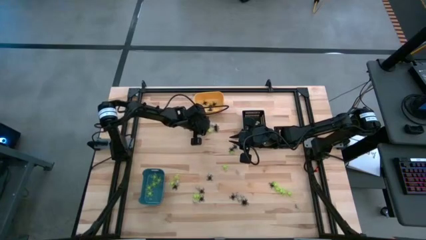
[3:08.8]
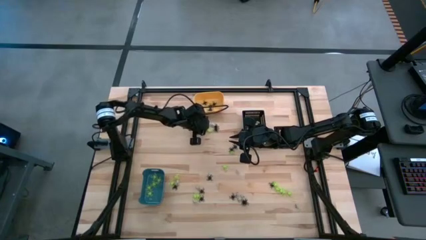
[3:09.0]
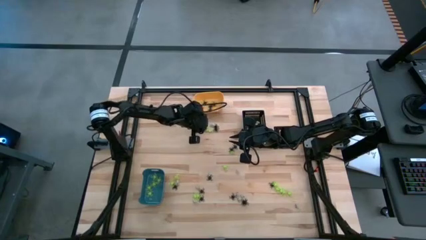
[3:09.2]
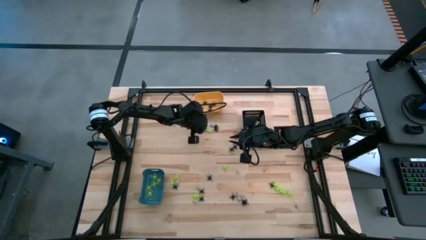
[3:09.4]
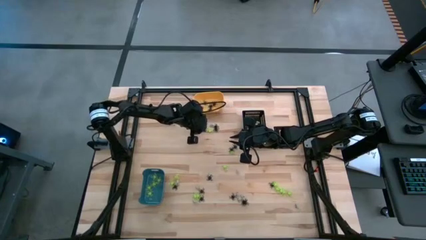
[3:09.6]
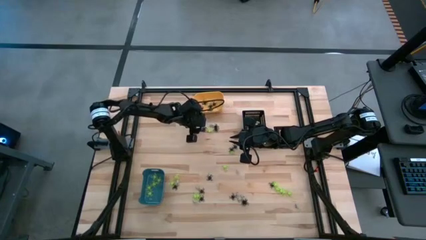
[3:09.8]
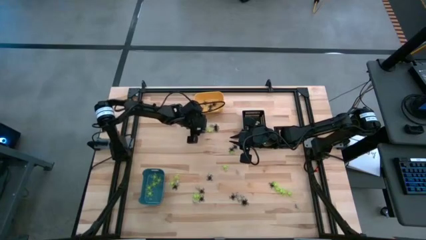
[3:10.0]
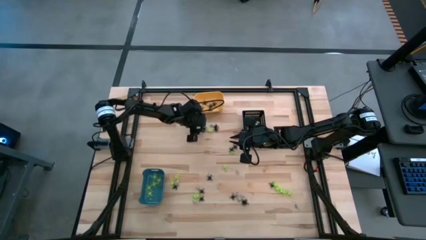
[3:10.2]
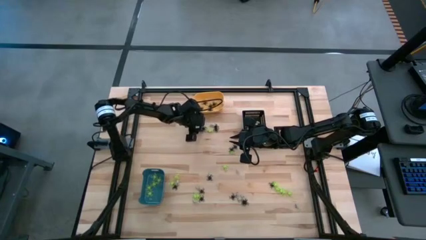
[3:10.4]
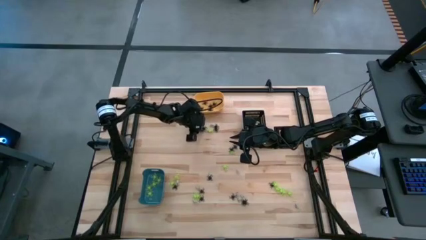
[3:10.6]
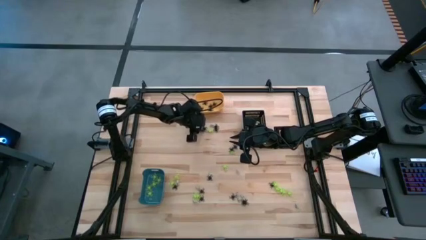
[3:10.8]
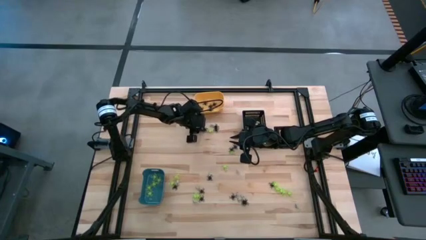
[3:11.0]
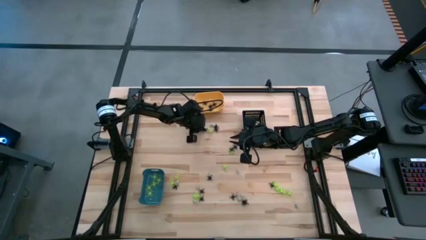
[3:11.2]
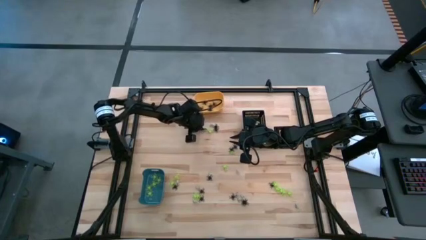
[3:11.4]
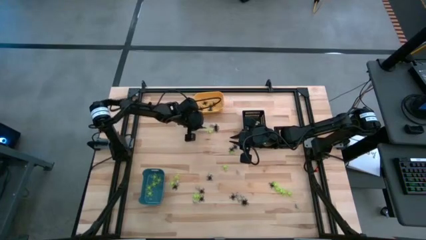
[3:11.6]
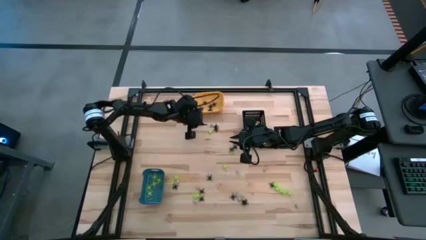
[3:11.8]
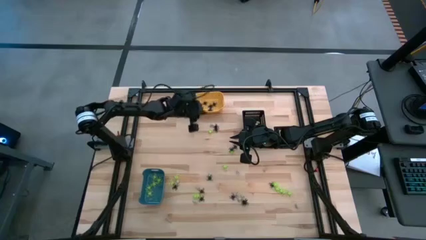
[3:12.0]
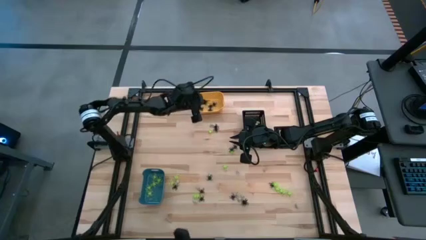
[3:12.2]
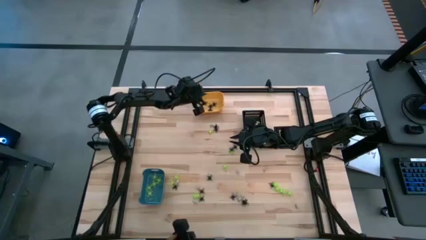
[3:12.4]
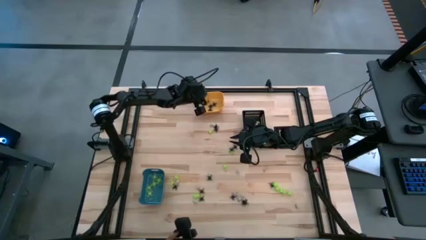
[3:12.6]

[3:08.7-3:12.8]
Task: Sort Halloween decoration
Put the black spider toy into the yellow bin

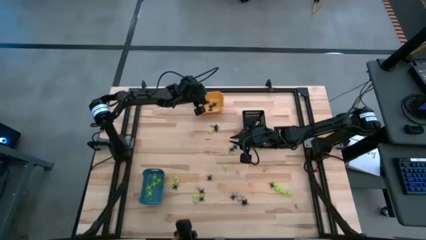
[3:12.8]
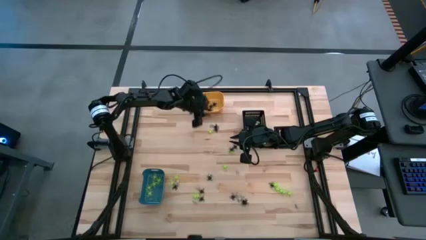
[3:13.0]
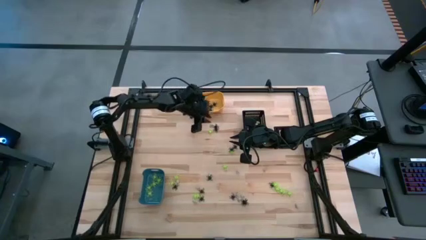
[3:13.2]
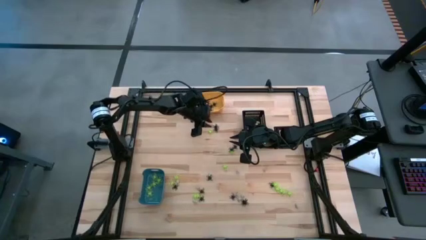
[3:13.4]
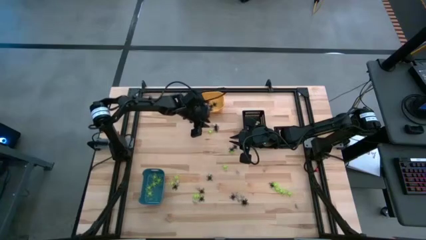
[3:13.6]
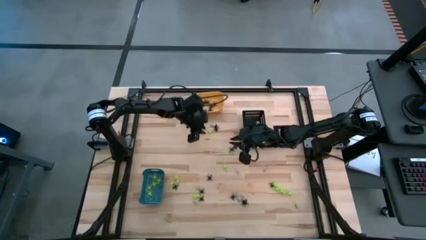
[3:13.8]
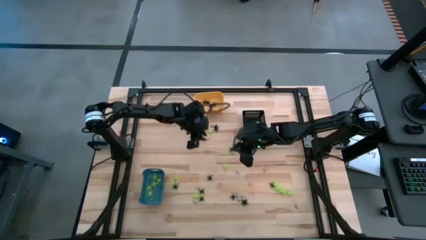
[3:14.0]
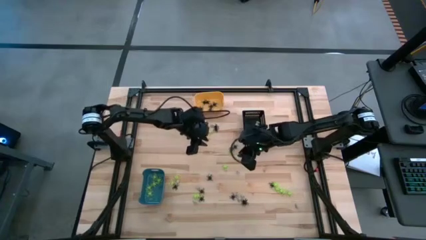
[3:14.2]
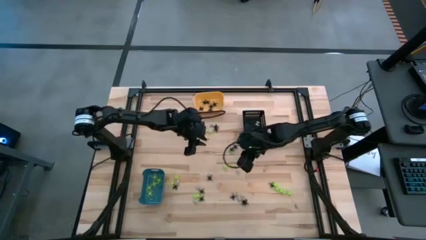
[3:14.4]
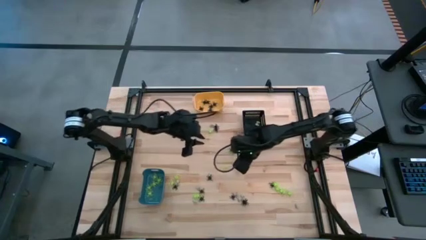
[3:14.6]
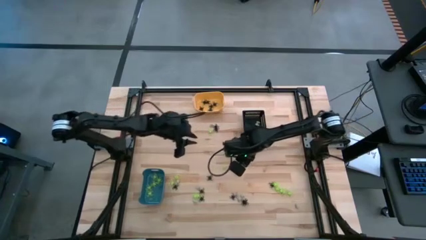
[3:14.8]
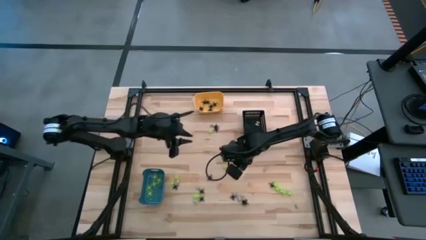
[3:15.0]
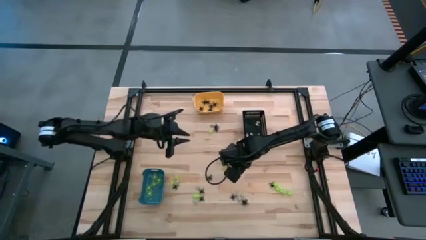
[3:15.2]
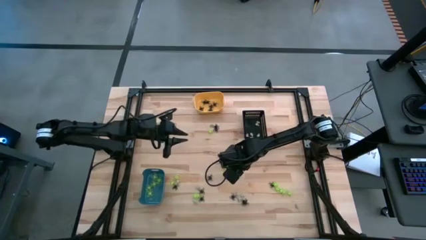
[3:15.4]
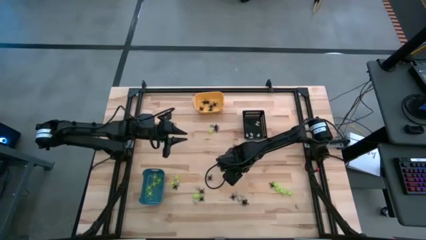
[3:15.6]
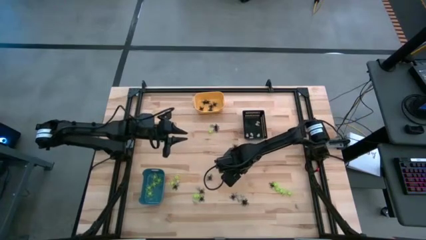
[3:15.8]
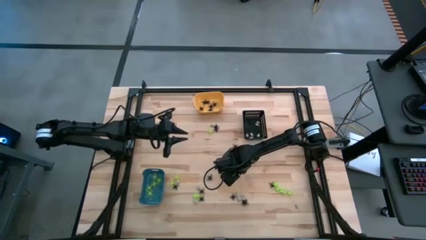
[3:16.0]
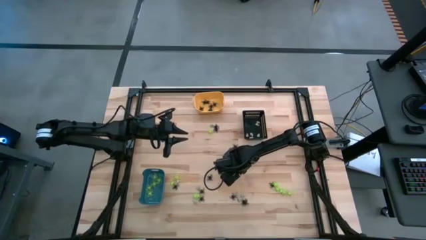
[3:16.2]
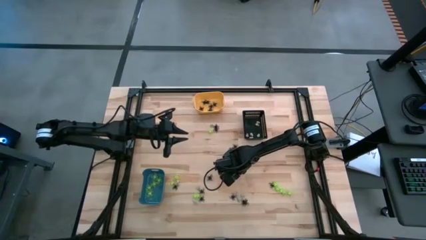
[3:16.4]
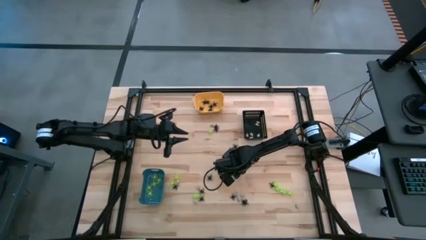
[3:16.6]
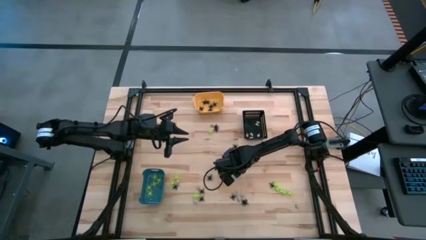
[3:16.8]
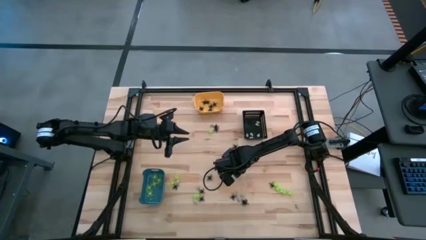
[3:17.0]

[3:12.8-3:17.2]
Put the white skull toy into the black bin

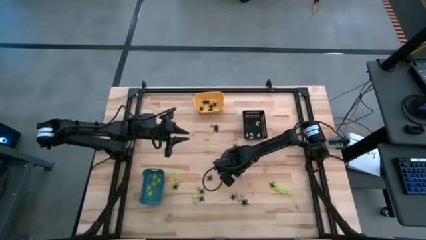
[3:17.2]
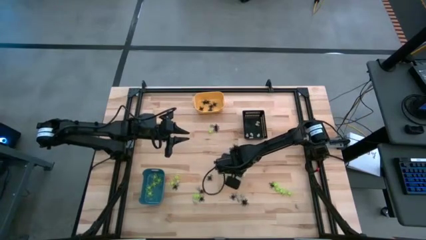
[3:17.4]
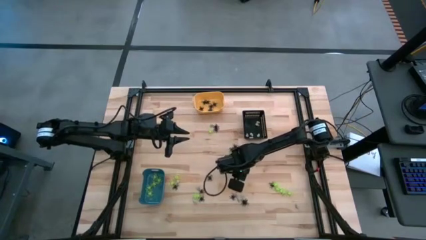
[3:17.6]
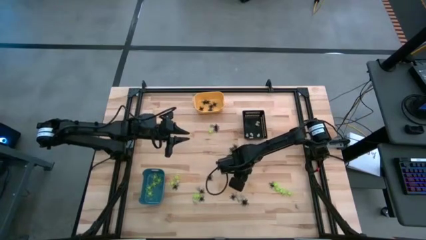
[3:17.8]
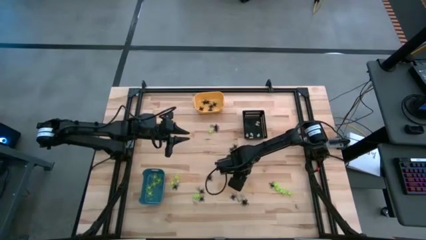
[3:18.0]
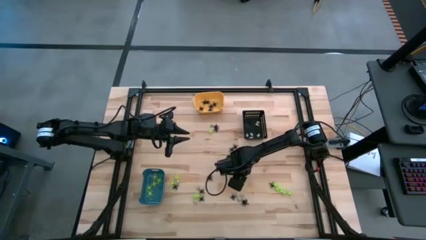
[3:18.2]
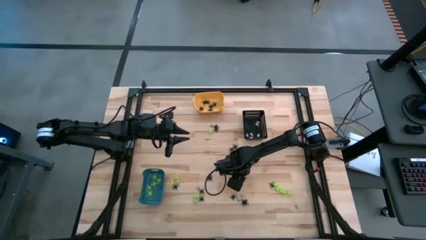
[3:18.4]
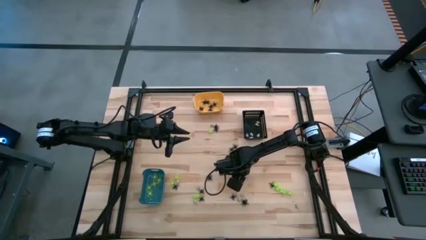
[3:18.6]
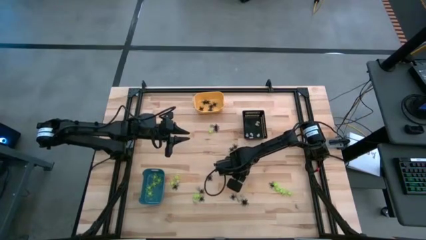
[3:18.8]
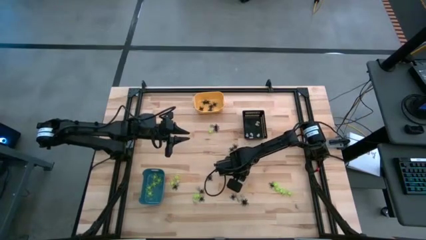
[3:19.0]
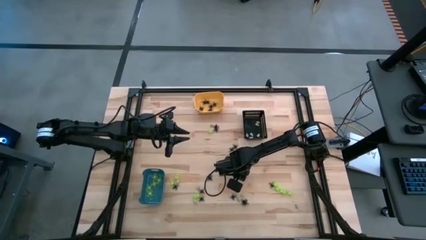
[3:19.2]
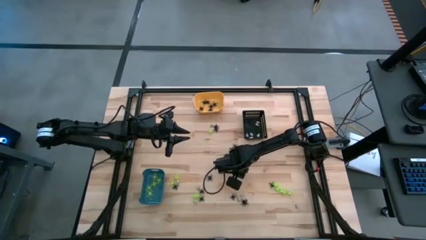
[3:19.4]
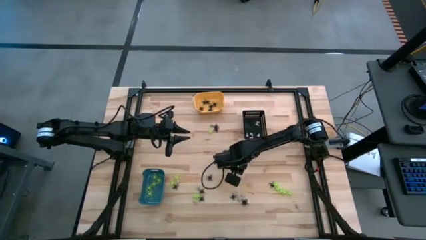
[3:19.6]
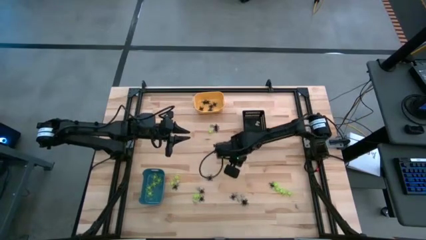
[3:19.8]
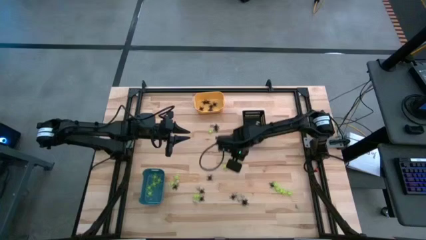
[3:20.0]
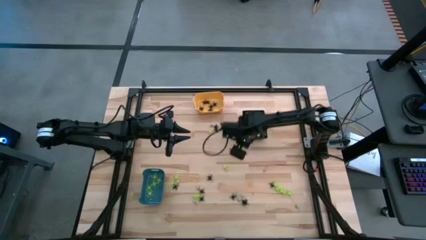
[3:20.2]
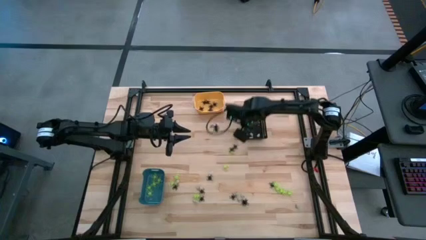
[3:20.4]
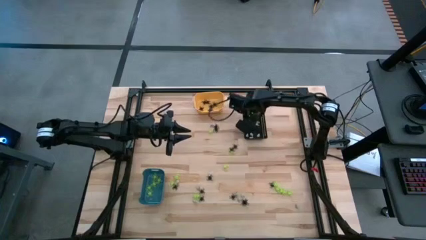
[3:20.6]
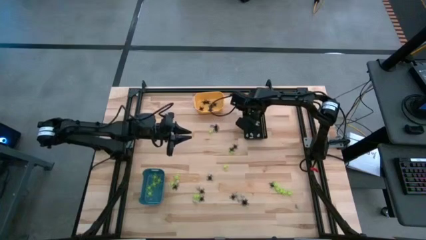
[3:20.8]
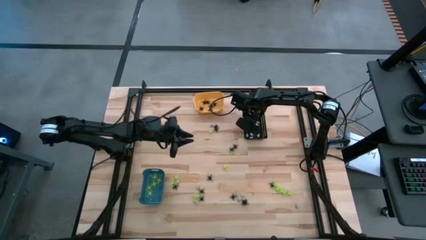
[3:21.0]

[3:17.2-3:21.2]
Put the white skull toy into the black bin

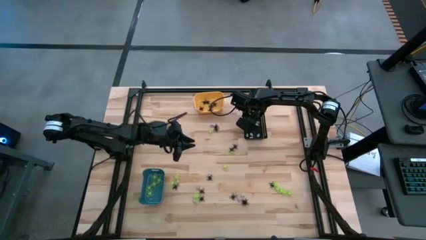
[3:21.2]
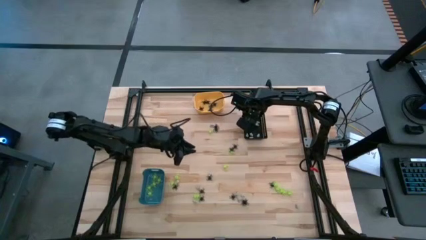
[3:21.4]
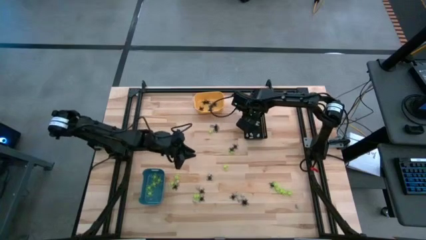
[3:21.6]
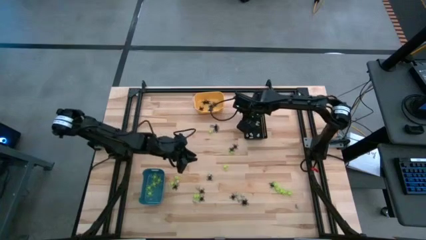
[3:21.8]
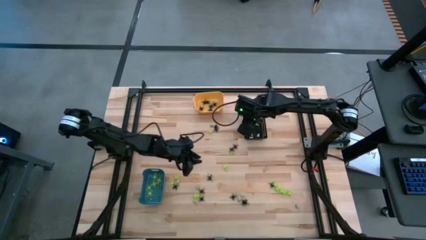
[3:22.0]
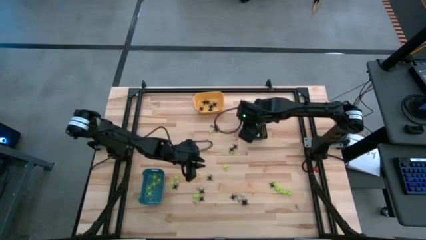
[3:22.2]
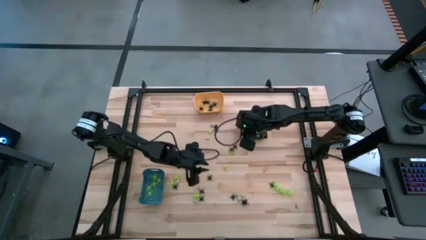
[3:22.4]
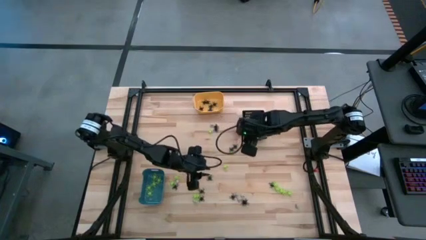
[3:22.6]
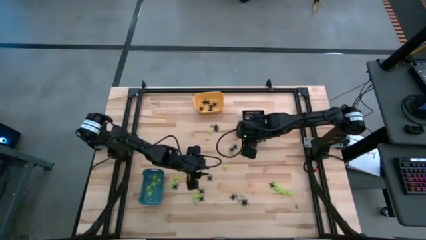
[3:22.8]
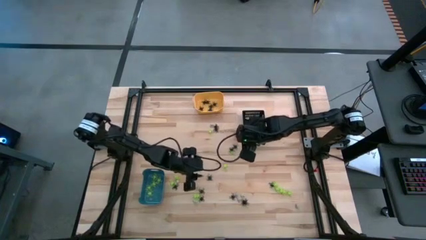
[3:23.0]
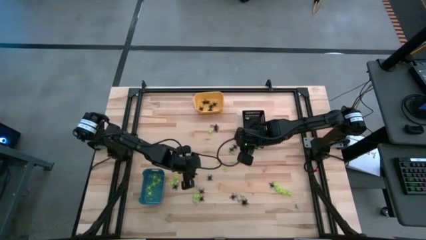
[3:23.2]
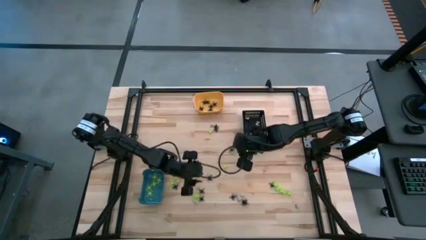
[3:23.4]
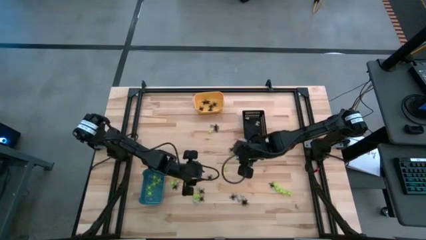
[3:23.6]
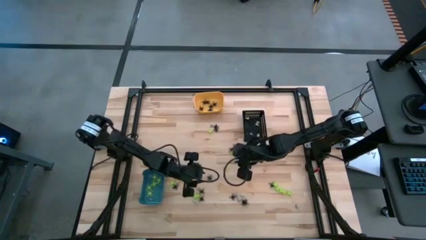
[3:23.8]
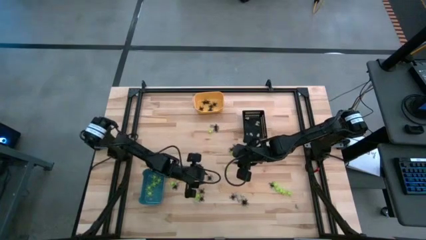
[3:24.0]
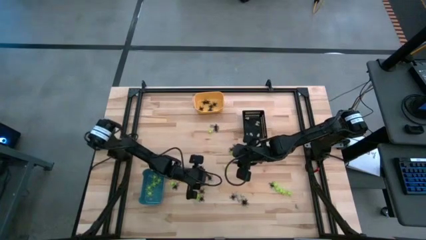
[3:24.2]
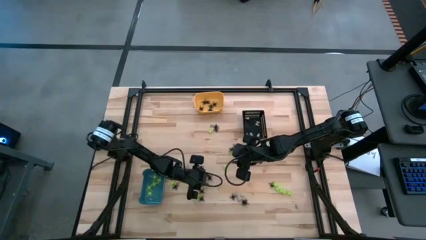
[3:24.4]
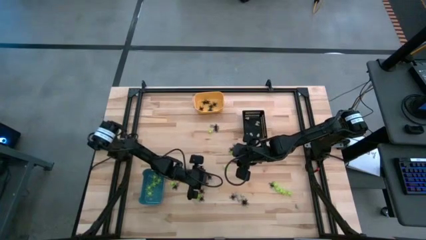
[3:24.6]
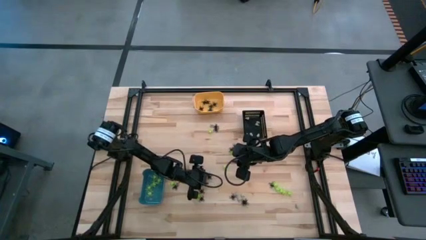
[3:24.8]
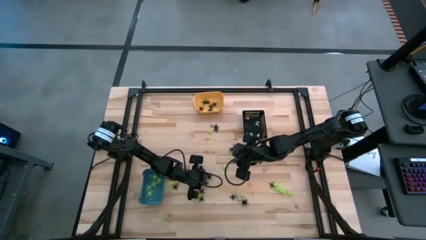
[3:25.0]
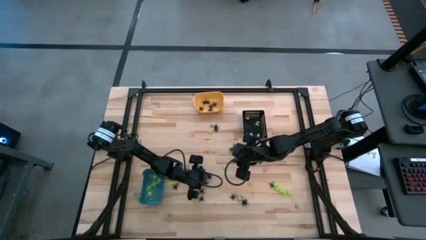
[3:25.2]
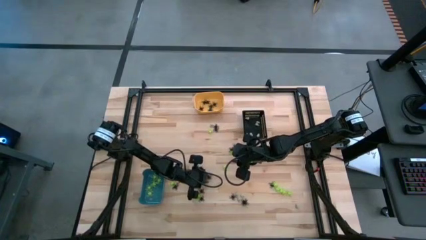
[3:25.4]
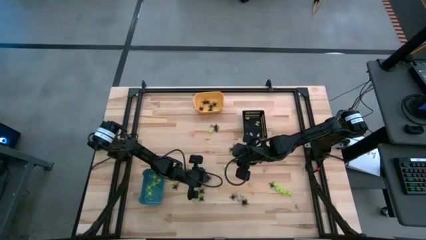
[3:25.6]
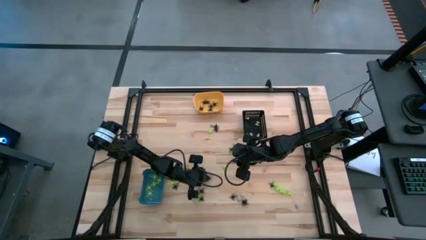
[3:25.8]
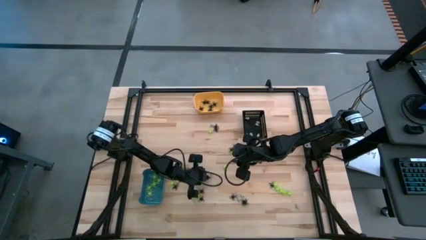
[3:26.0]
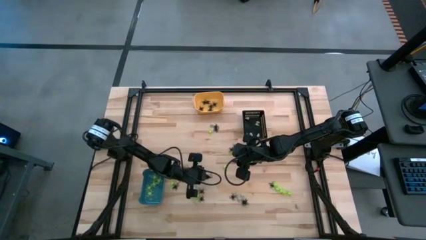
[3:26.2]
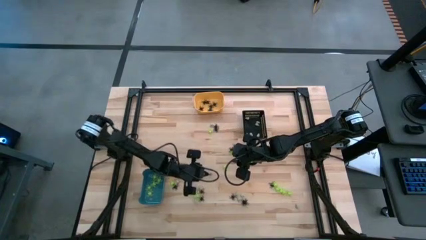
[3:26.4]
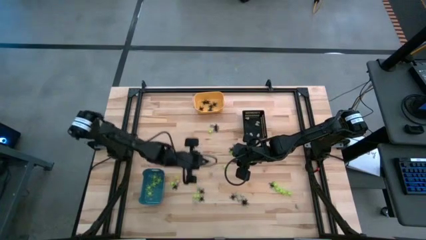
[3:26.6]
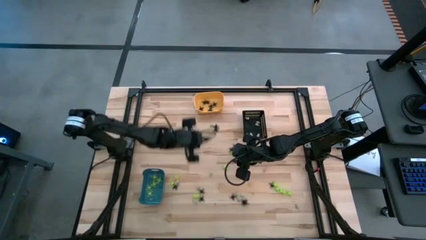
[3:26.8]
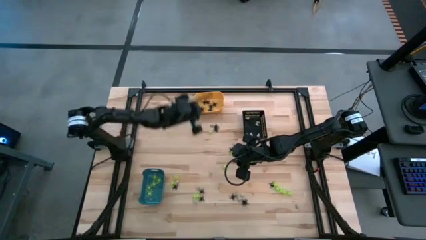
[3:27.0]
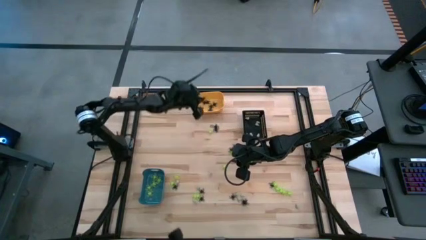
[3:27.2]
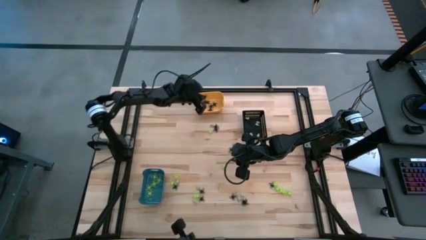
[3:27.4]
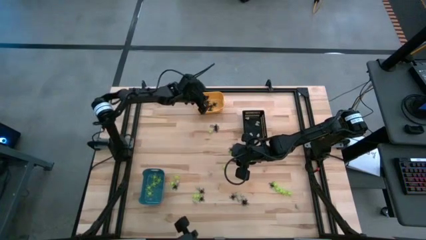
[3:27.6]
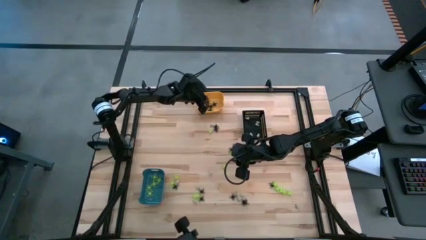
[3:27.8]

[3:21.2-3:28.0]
Put the black spider toy into the yellow bin
